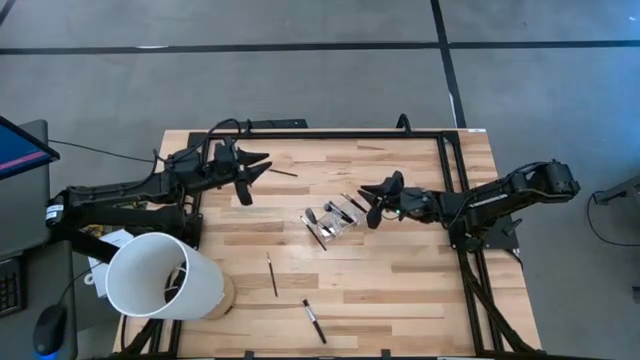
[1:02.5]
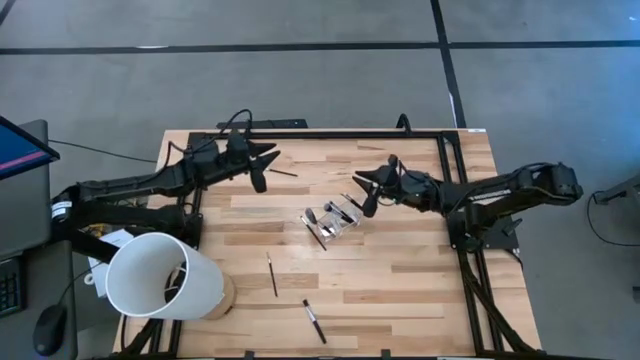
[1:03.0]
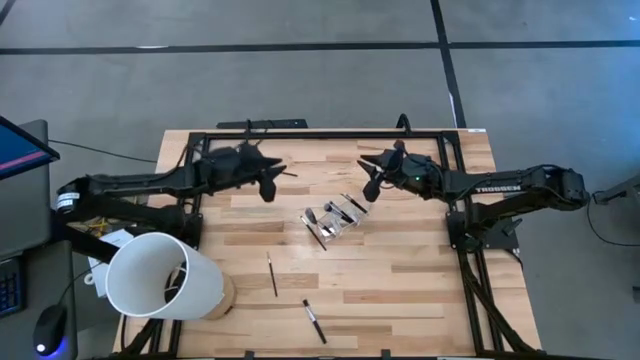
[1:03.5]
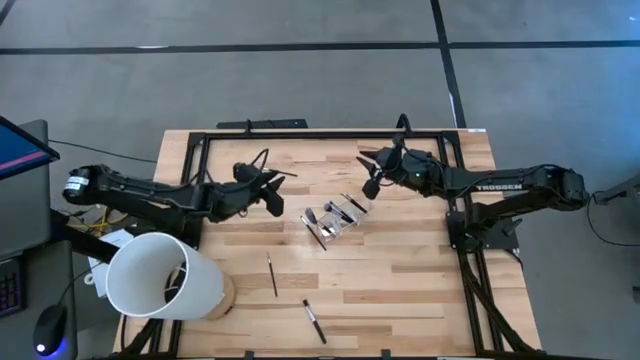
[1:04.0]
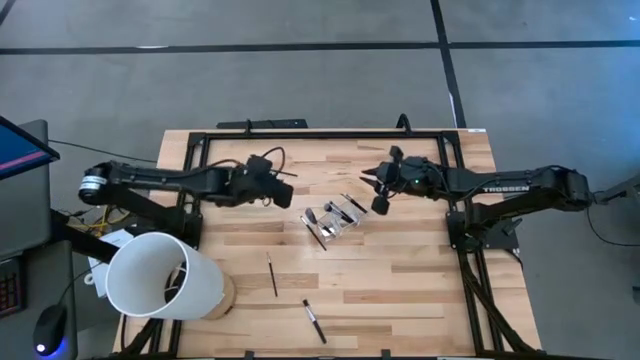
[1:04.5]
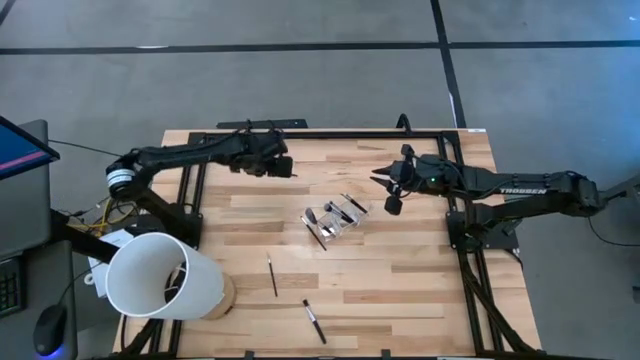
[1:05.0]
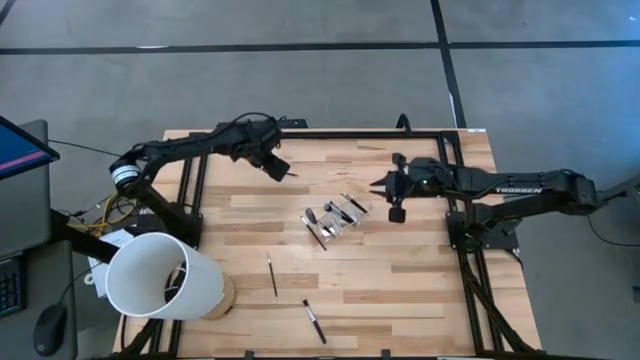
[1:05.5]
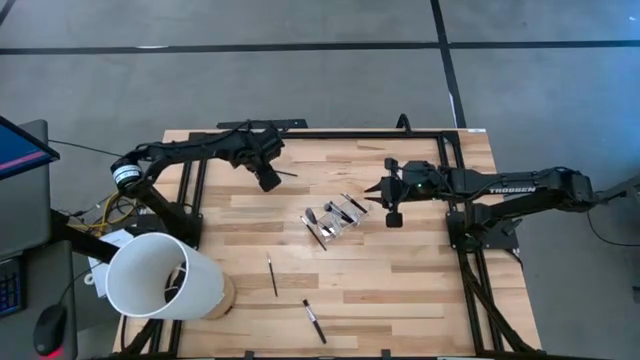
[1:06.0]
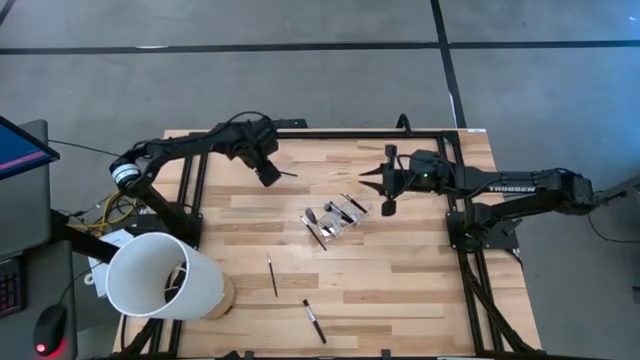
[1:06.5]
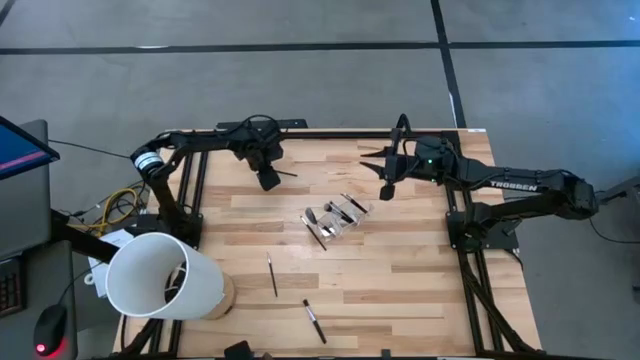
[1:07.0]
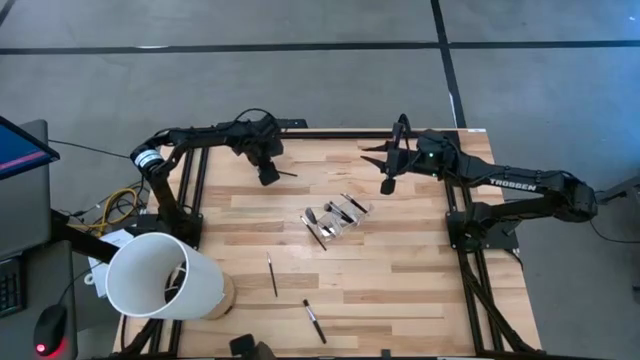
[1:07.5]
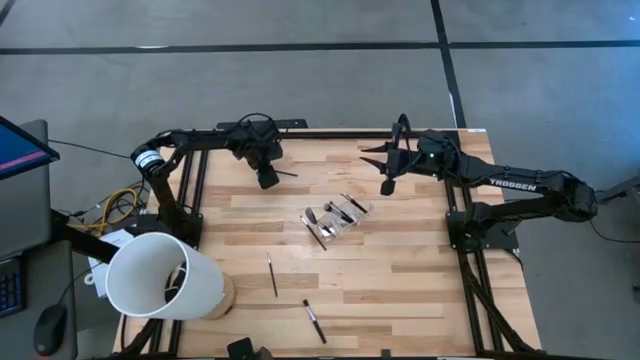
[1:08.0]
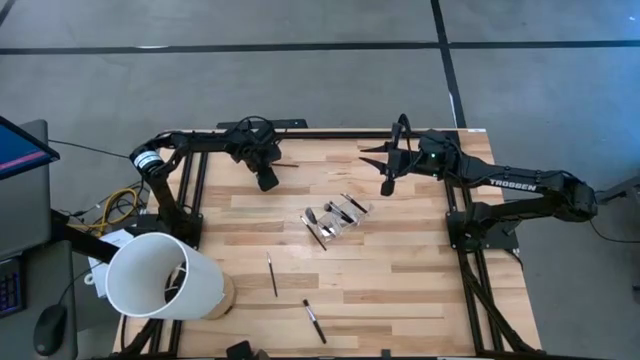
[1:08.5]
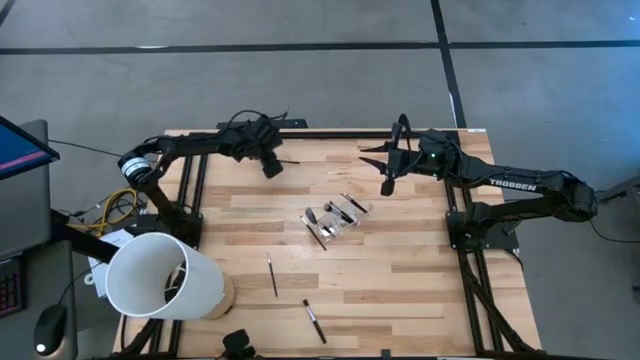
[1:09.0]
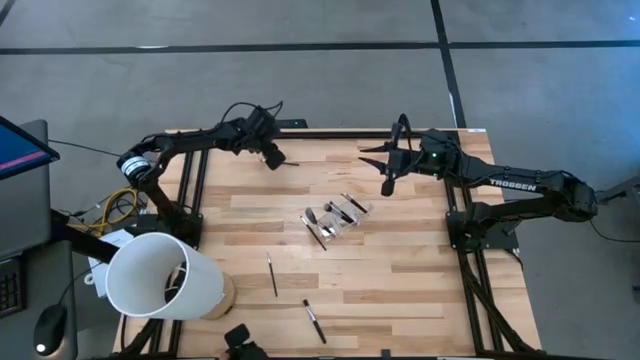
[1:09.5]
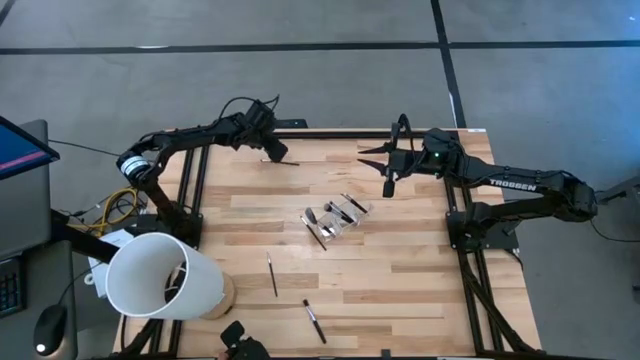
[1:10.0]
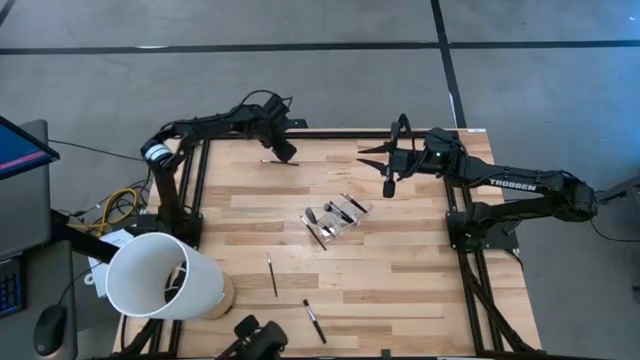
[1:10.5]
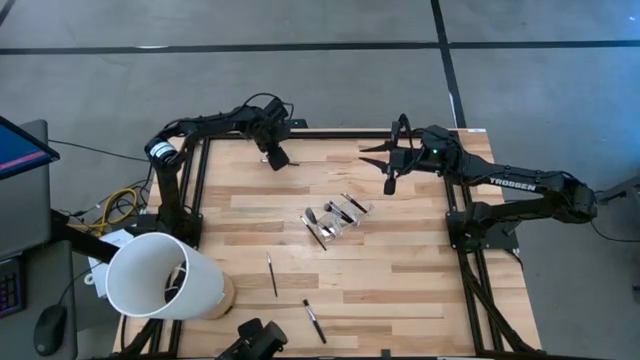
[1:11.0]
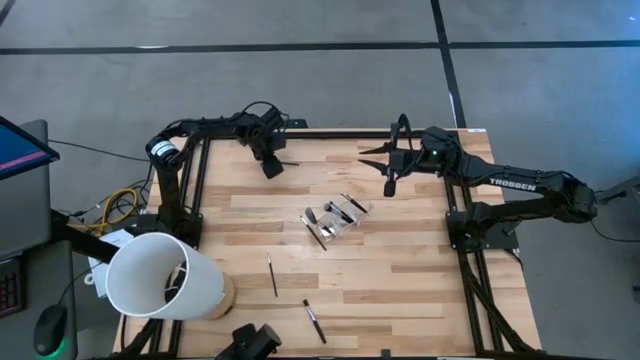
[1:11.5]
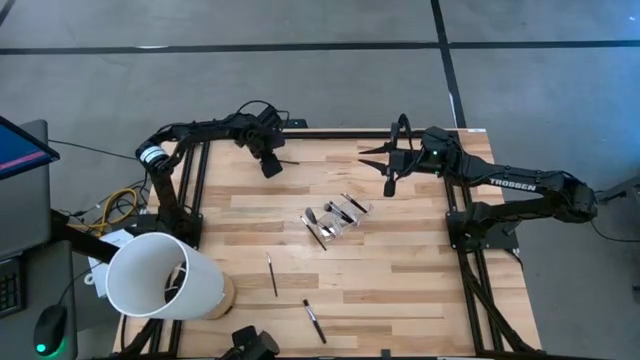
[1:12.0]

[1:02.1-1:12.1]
Task: Put items in baskets/containers
Put the top black eyeshadow brush into the transparent organizer

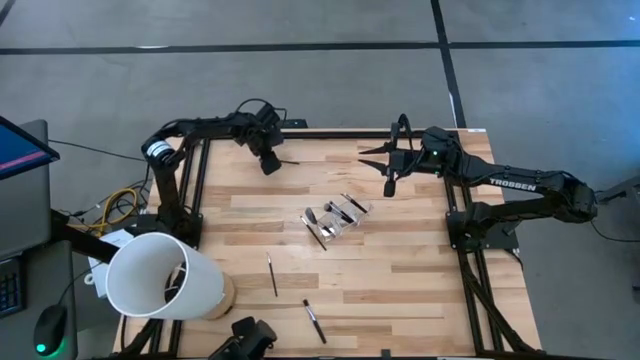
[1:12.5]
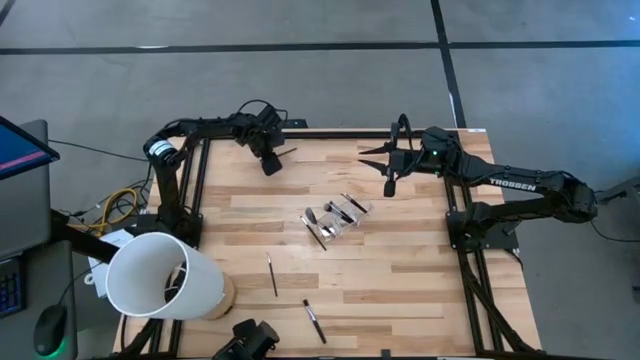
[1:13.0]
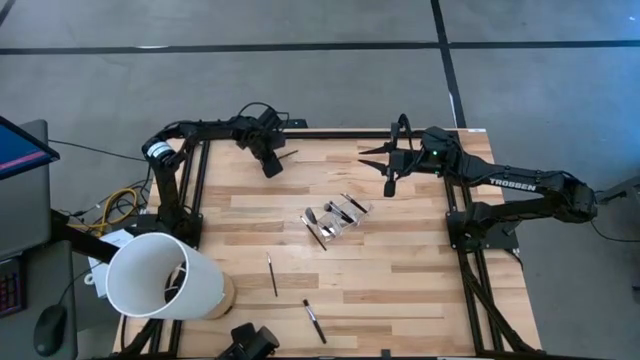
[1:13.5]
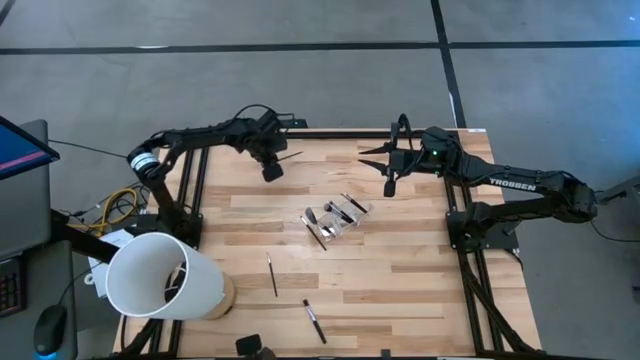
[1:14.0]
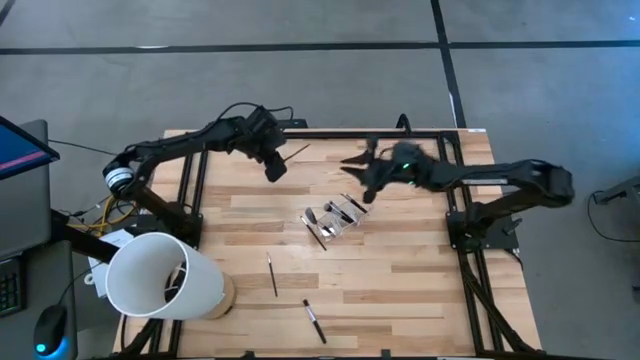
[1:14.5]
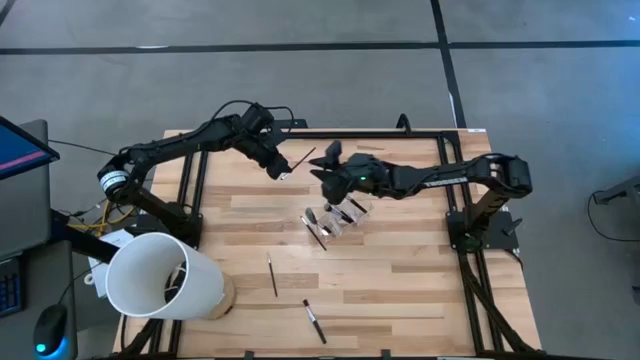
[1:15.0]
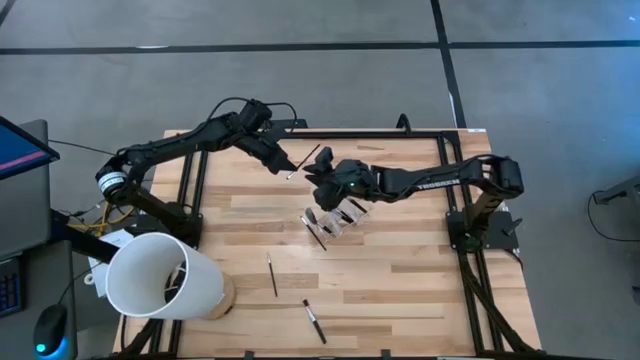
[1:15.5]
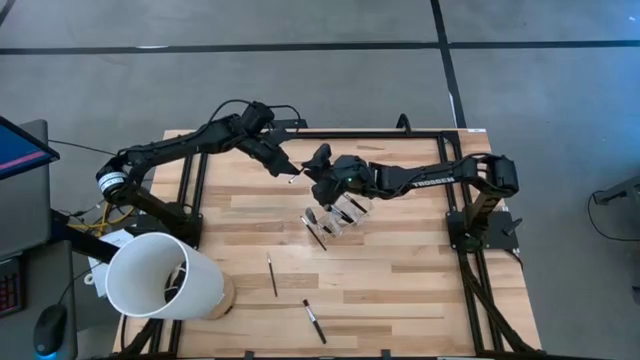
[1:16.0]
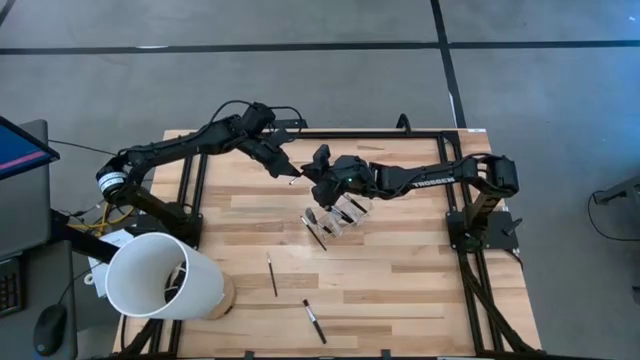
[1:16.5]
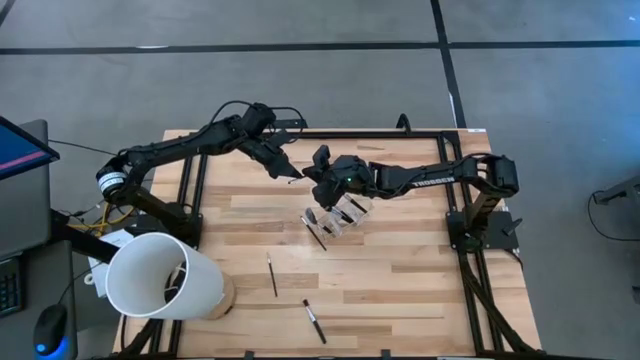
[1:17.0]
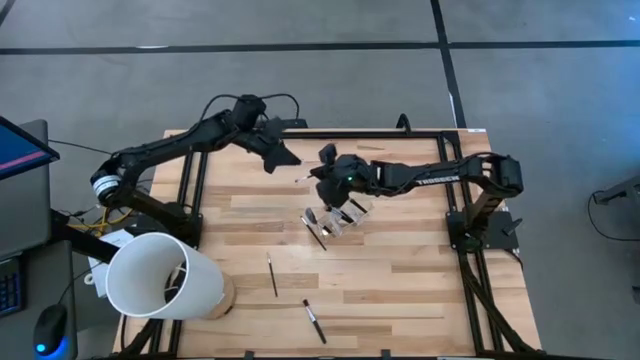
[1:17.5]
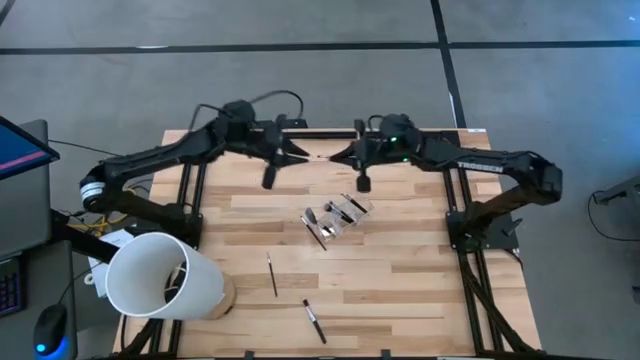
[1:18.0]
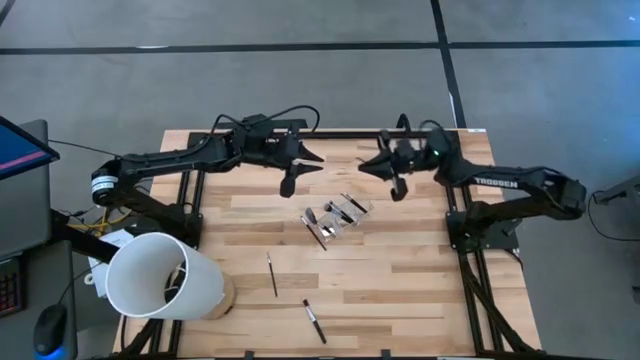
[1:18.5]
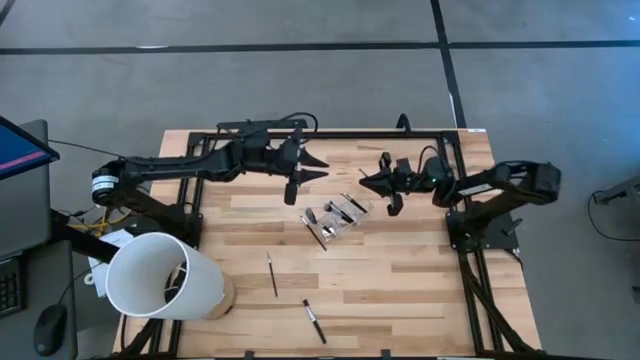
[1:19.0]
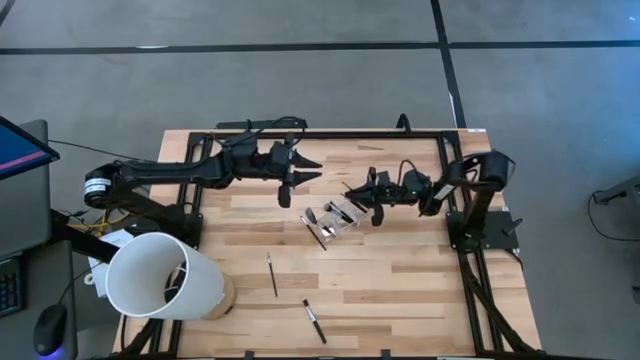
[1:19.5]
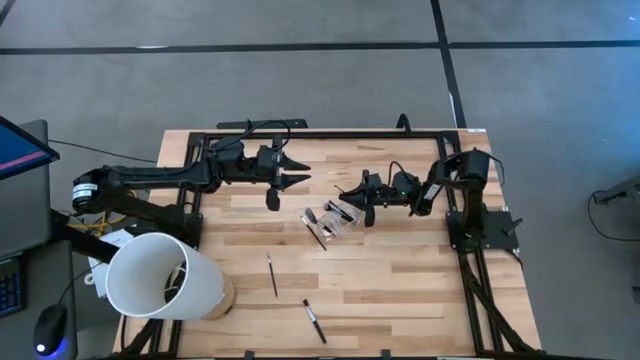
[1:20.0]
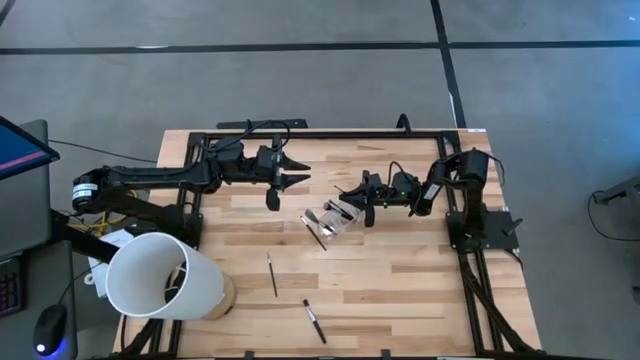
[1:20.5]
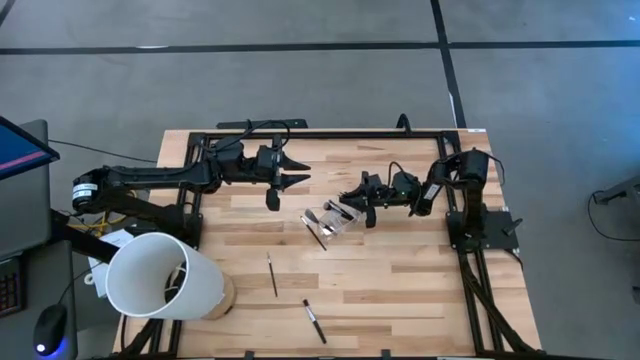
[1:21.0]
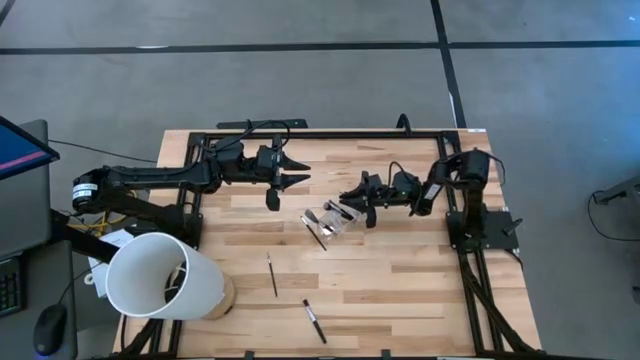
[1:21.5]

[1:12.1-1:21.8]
Put the top black eyeshadow brush into the transparent organizer

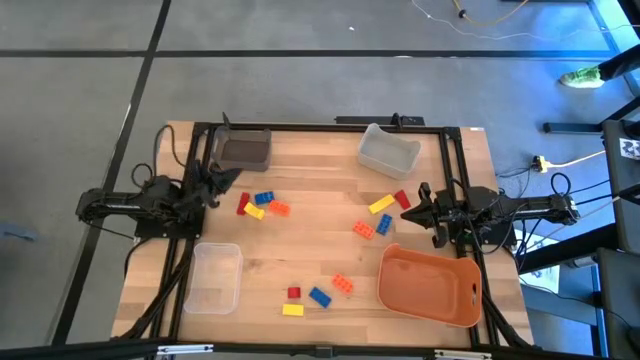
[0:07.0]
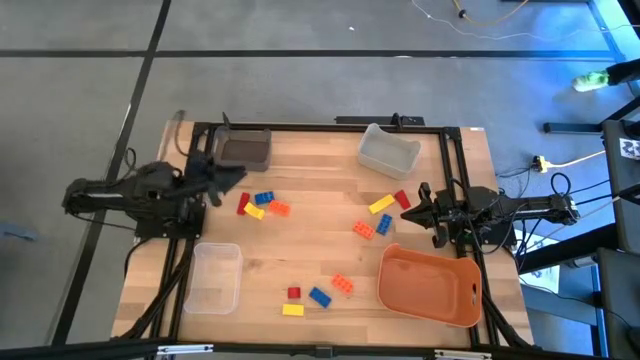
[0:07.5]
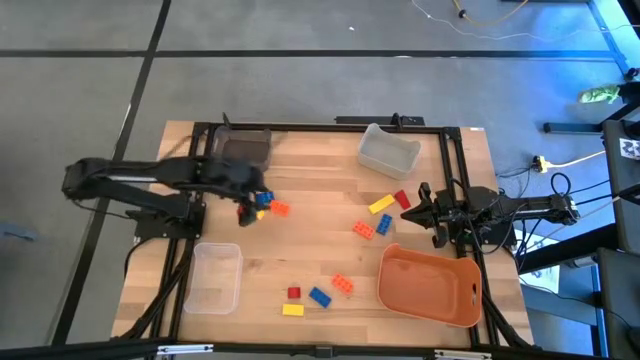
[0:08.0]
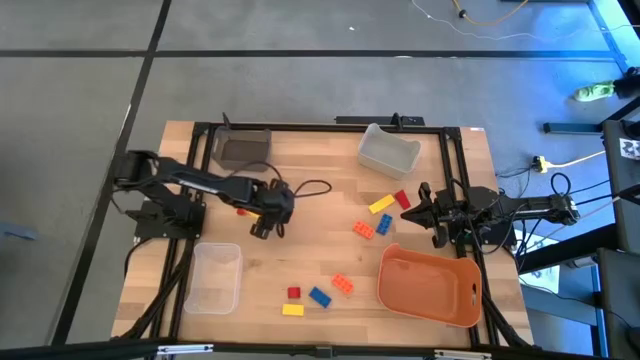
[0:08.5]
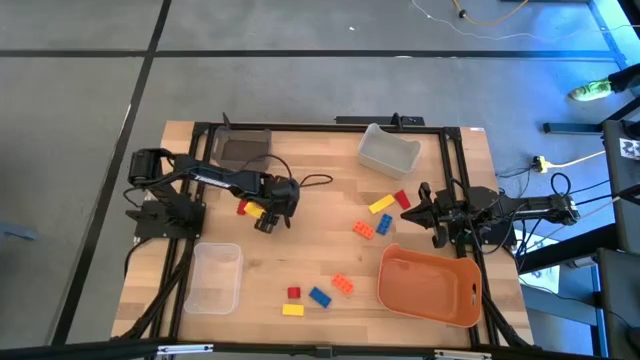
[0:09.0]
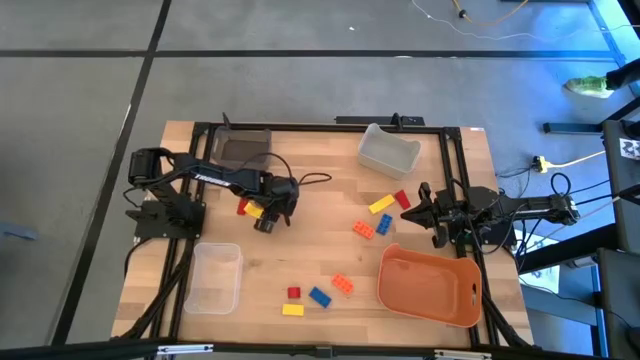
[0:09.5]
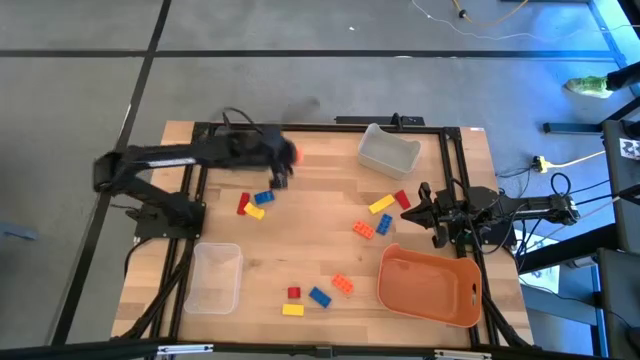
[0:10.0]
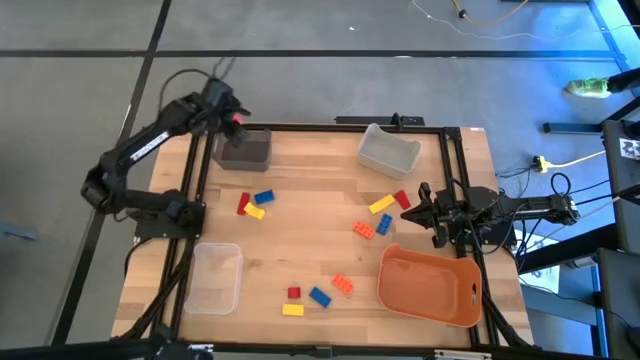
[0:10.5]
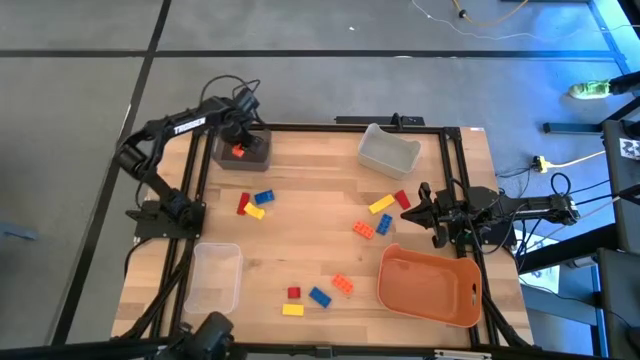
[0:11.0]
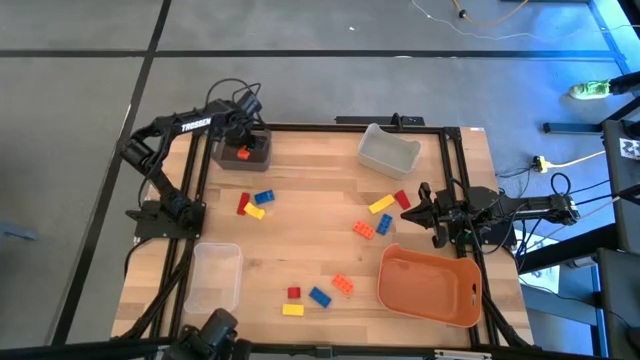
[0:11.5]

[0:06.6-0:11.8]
Task: Sort & place blocks by color
Put the top left orange gamepiece into the black bin
